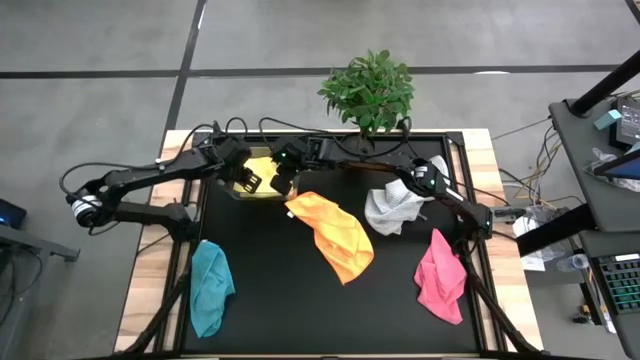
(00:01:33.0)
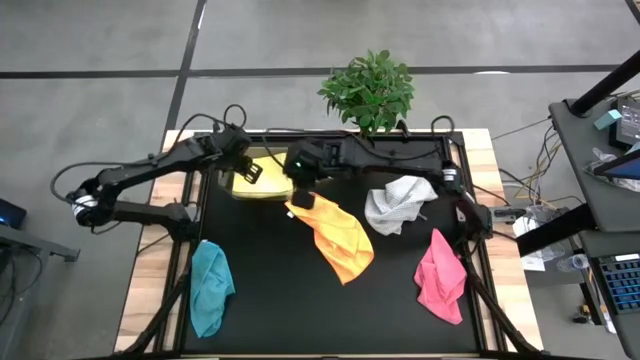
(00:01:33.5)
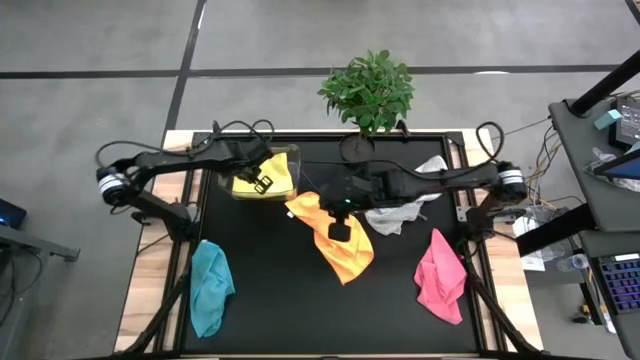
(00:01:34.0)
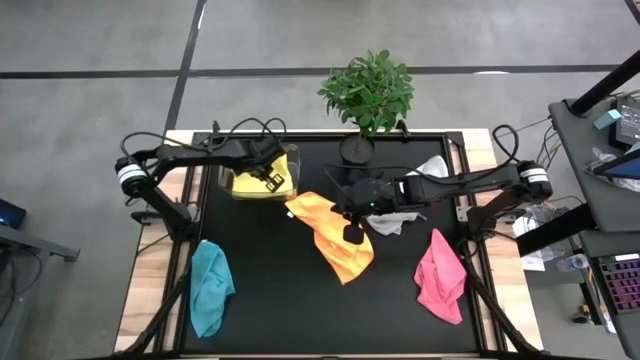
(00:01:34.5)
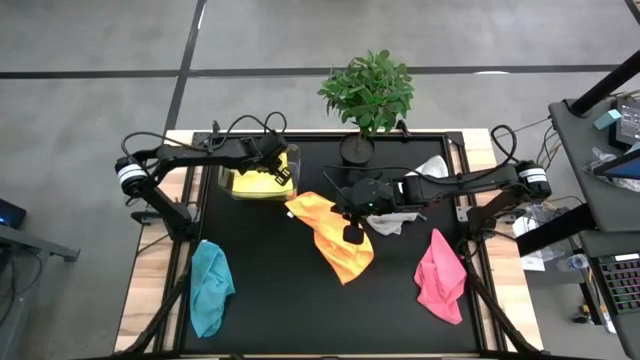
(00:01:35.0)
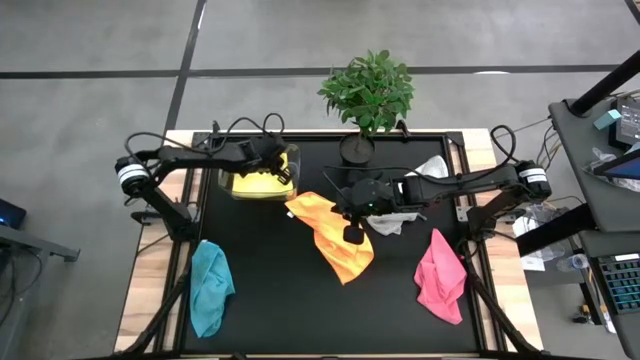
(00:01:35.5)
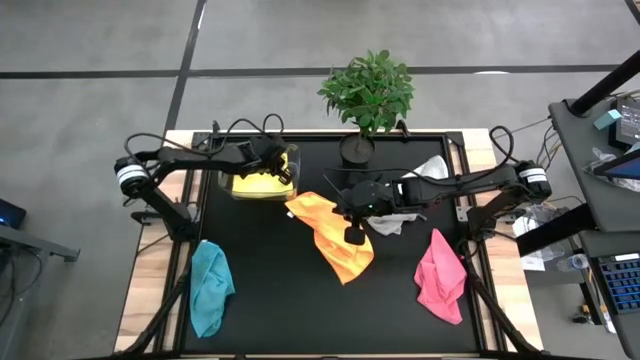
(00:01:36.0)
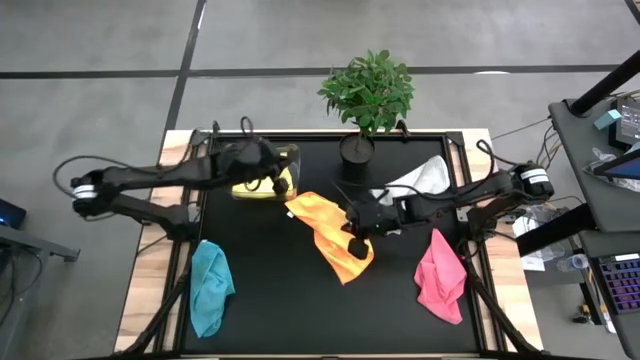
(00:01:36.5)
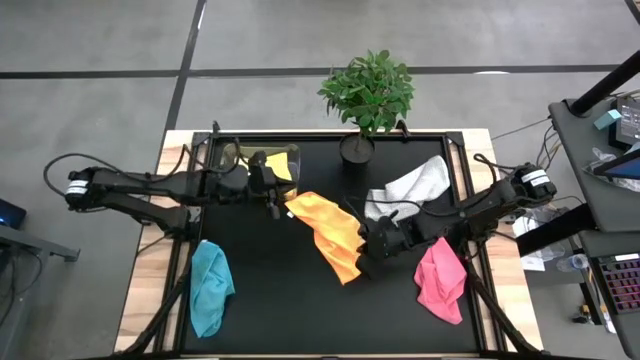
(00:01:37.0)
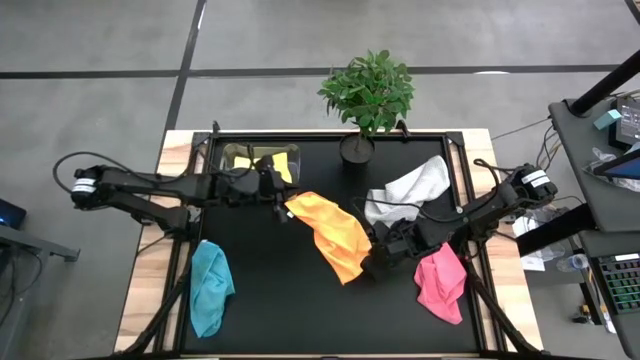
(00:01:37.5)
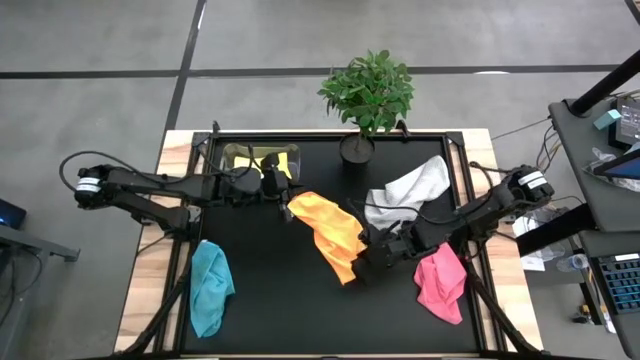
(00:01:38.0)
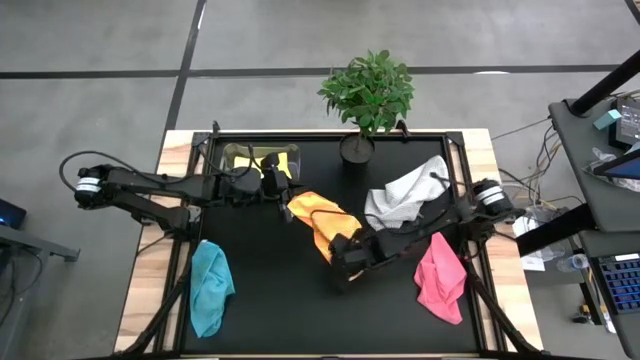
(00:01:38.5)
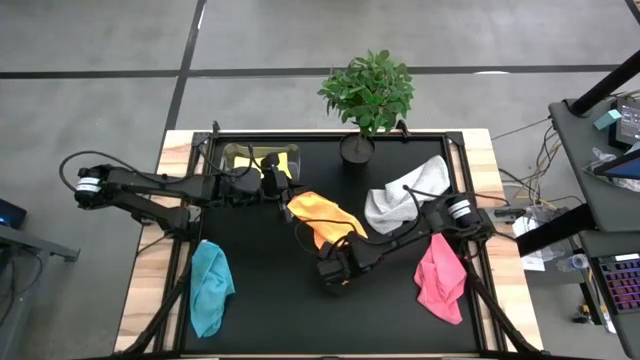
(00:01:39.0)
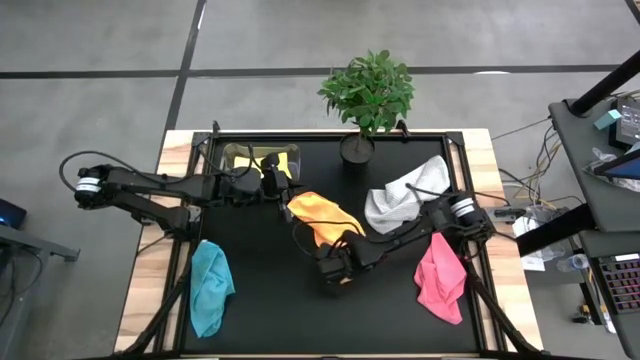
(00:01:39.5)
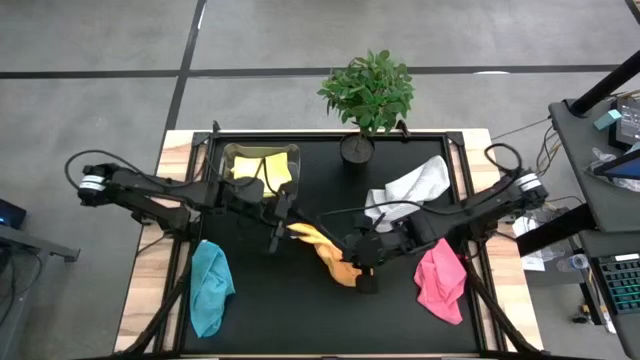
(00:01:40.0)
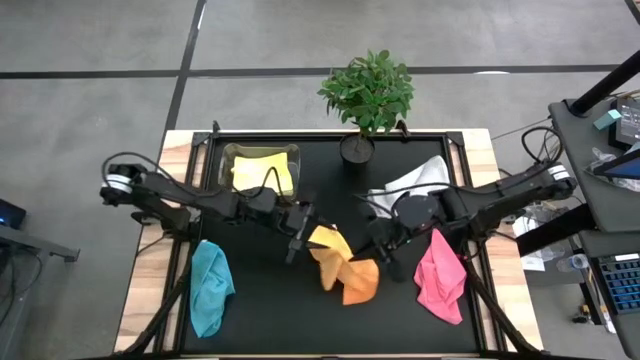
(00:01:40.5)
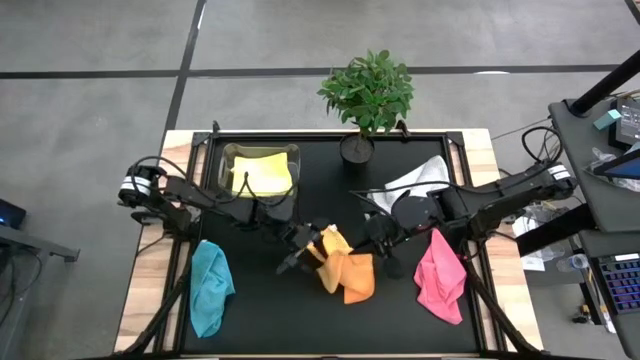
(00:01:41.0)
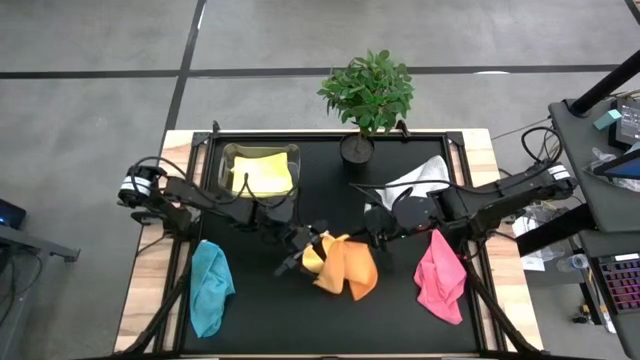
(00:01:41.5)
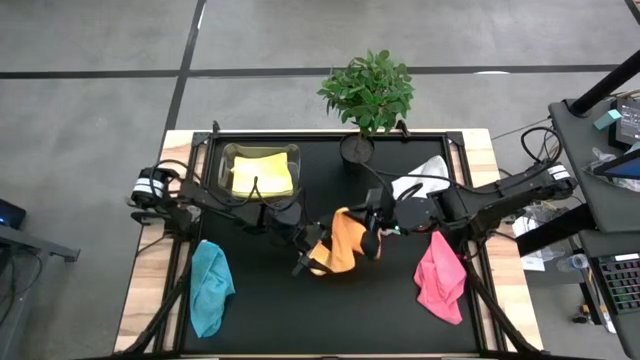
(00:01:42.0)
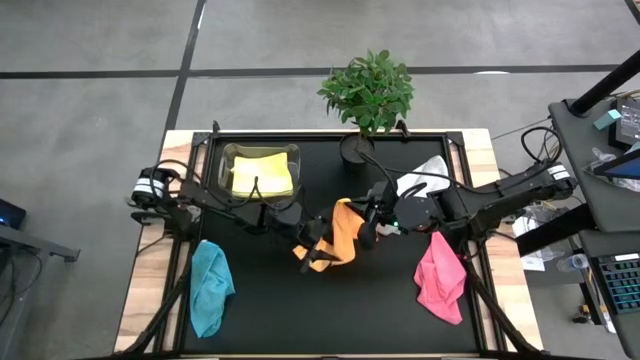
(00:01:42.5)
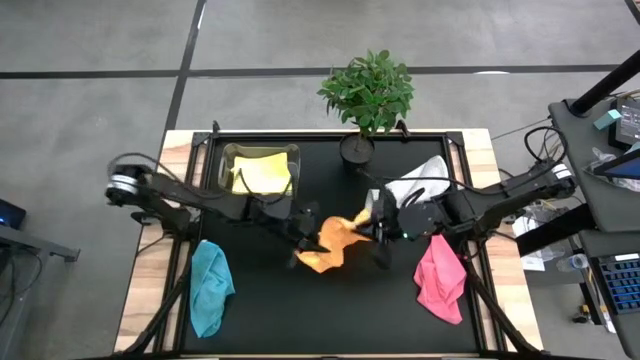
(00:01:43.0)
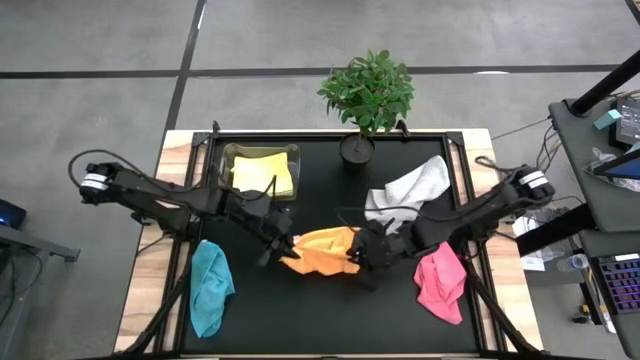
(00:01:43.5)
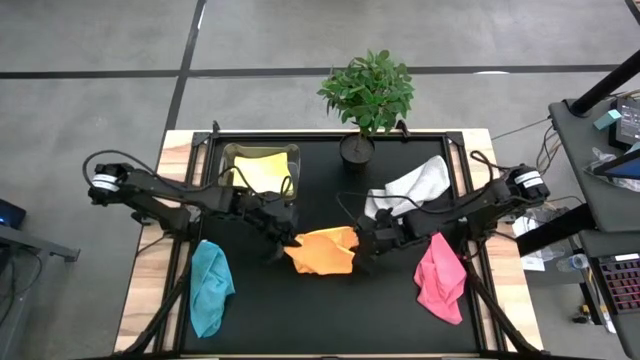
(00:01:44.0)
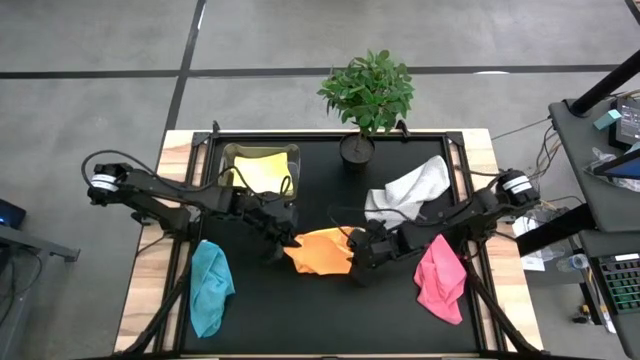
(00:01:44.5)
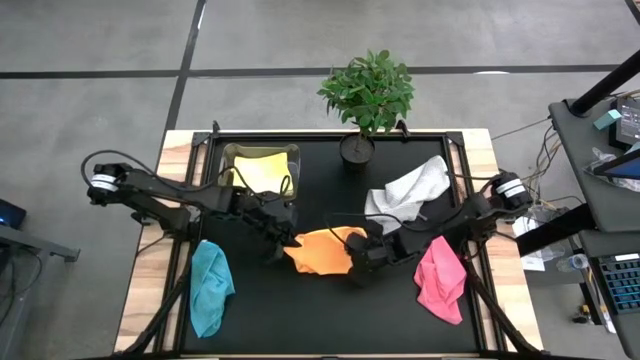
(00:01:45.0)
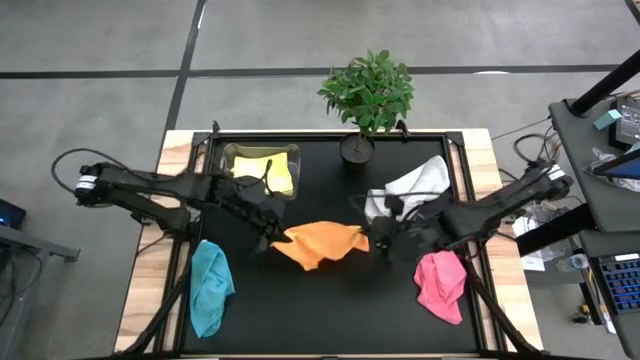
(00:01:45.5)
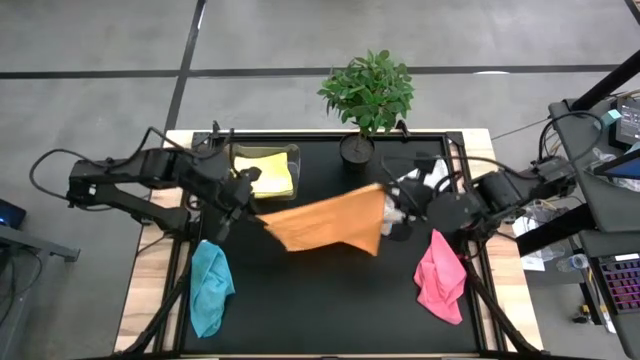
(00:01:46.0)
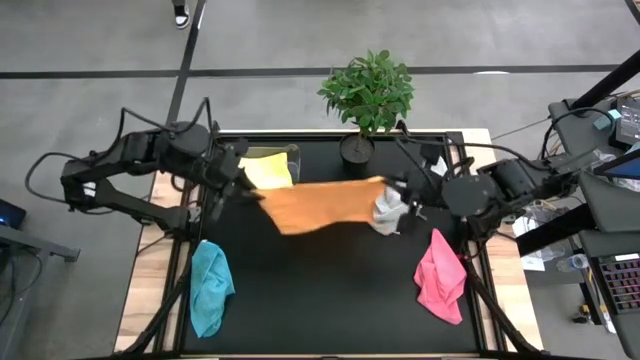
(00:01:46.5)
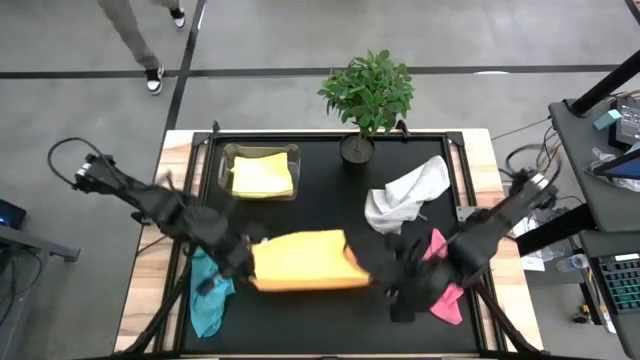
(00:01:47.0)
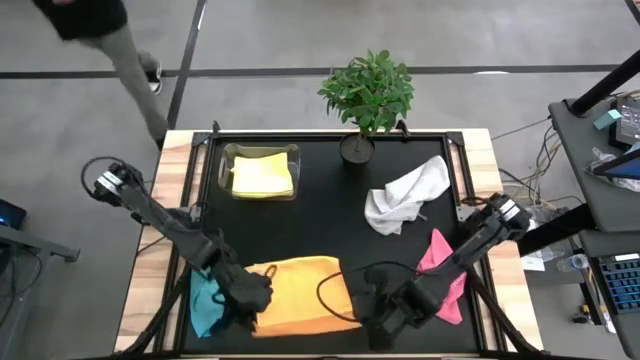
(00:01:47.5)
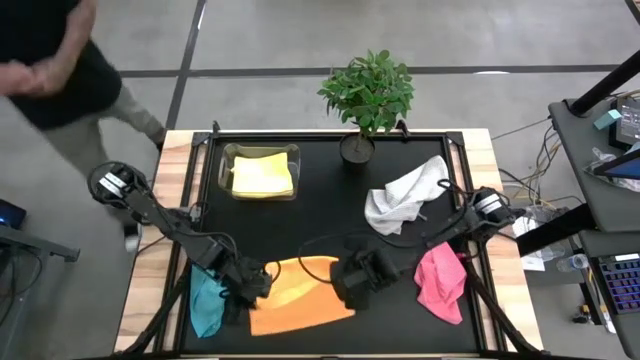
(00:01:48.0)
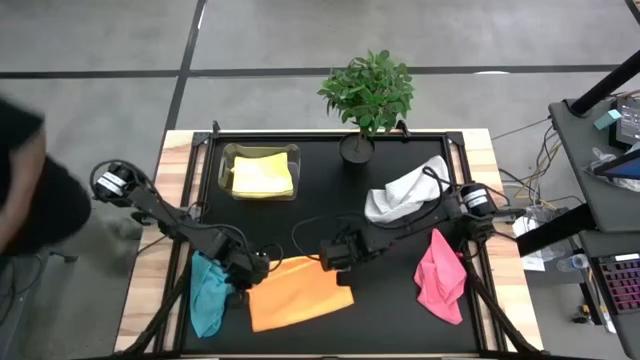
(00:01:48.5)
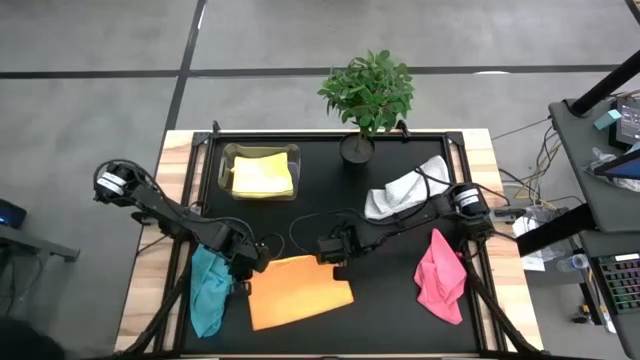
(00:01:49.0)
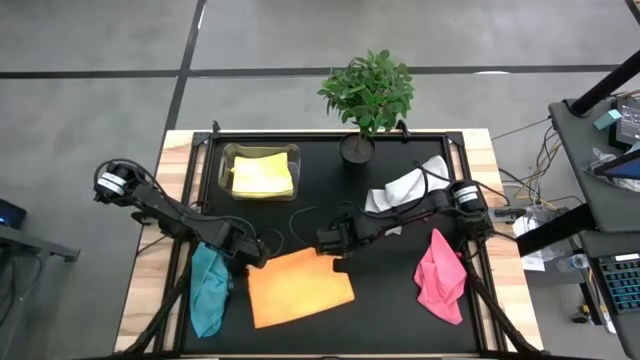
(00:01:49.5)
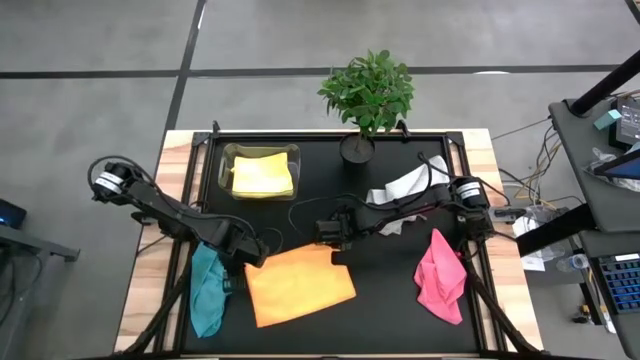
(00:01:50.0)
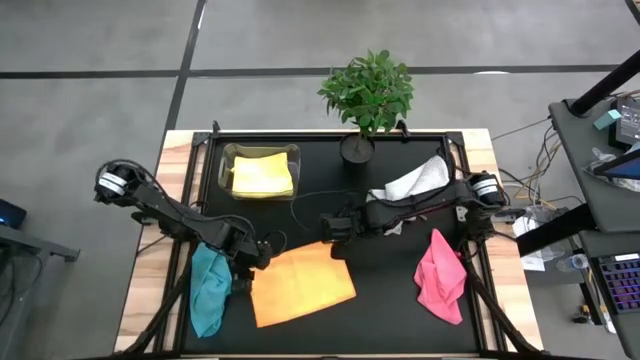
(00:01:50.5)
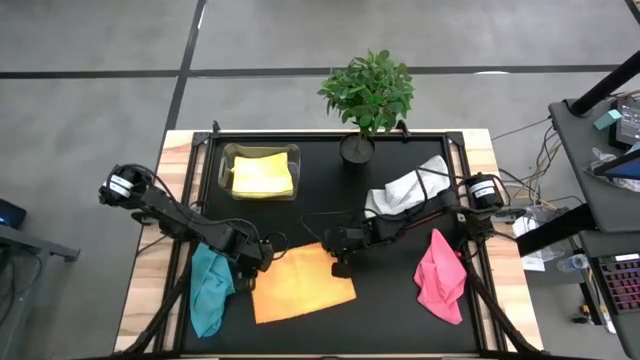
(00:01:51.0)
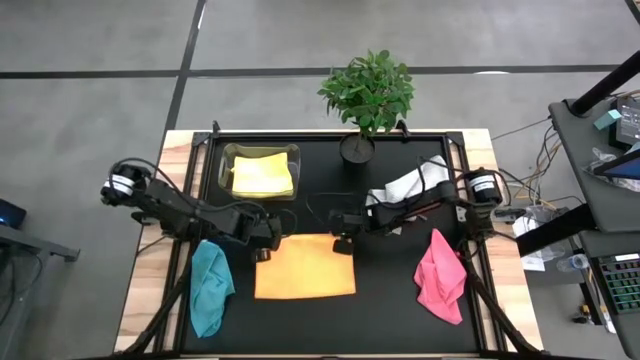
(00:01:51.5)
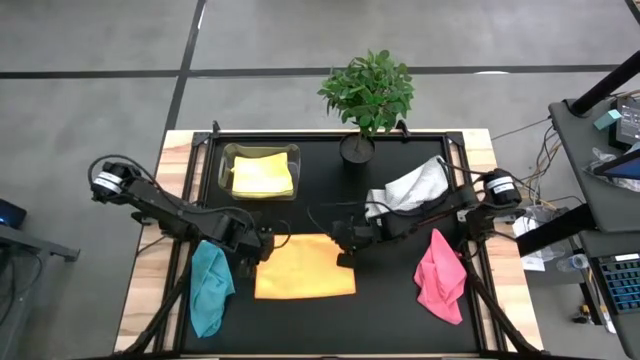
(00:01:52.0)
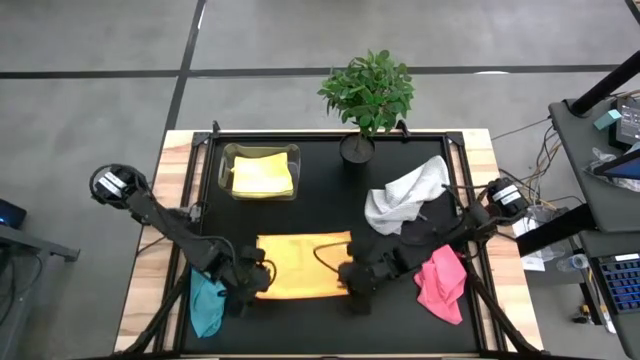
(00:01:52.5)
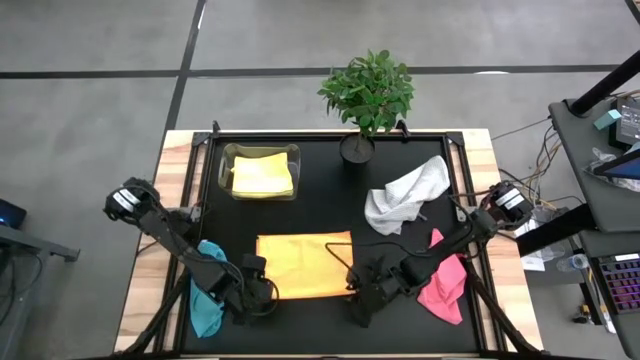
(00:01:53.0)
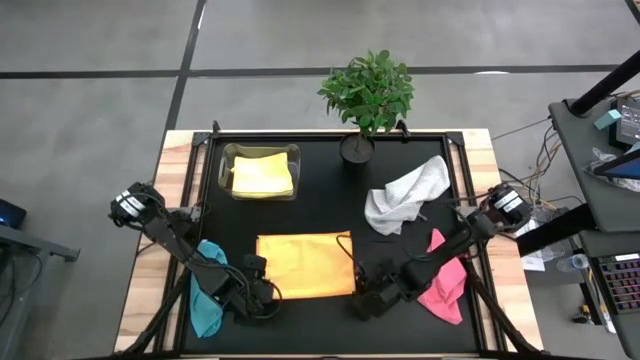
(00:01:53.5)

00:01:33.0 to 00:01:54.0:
Task: Fold microfiber towels
Fold the orange towel
